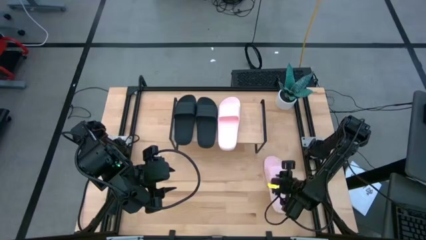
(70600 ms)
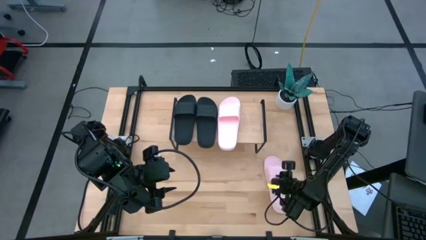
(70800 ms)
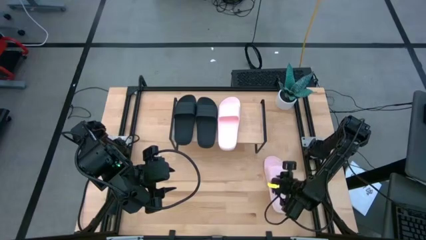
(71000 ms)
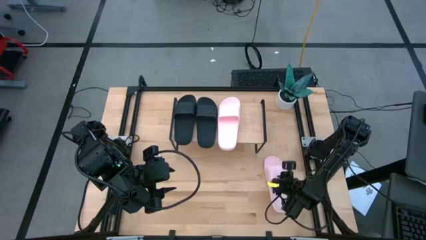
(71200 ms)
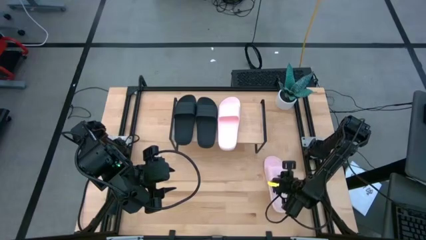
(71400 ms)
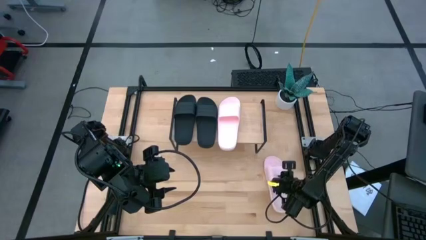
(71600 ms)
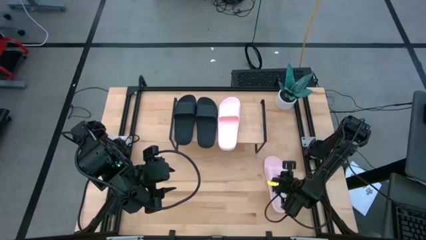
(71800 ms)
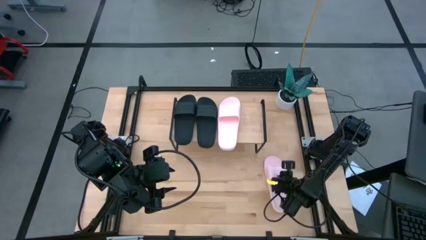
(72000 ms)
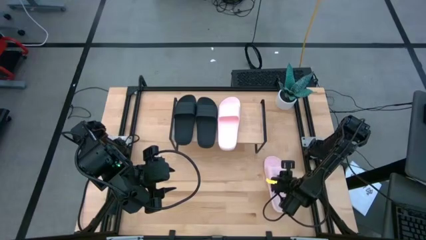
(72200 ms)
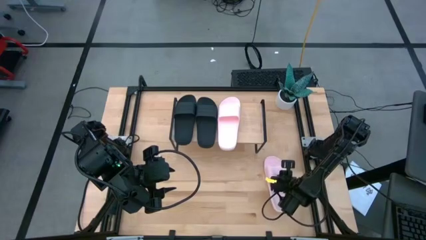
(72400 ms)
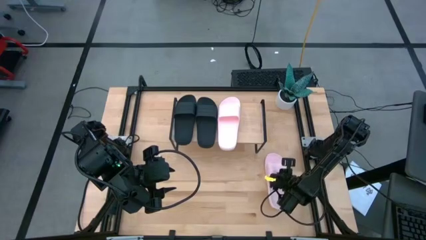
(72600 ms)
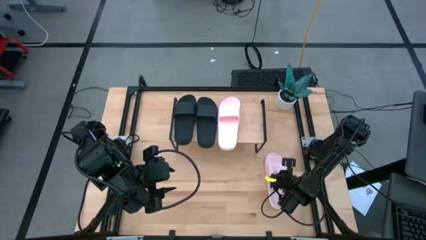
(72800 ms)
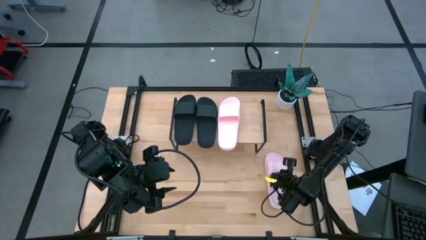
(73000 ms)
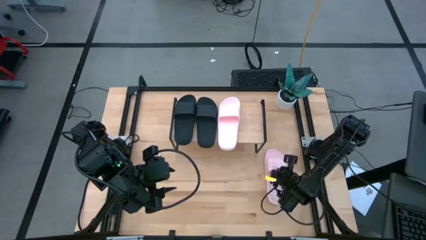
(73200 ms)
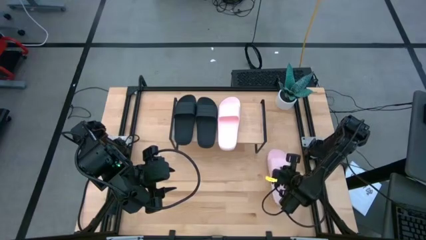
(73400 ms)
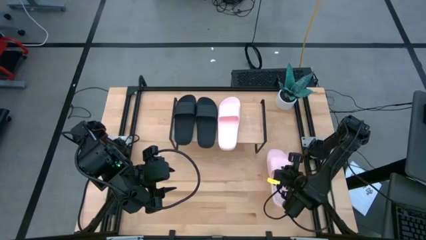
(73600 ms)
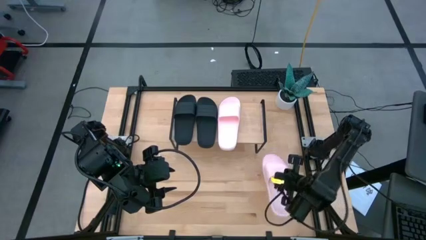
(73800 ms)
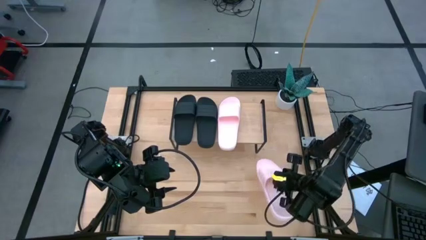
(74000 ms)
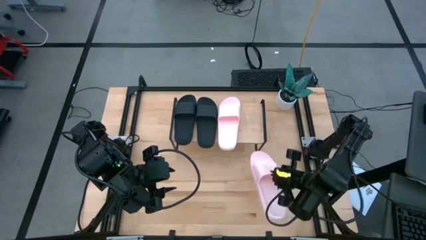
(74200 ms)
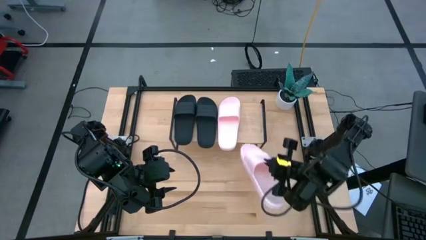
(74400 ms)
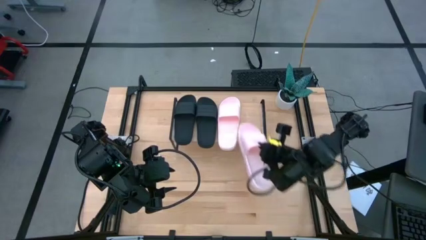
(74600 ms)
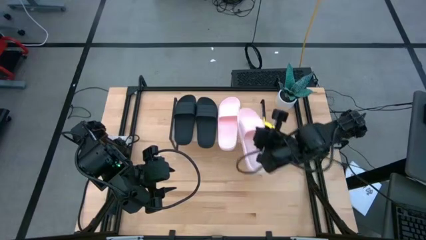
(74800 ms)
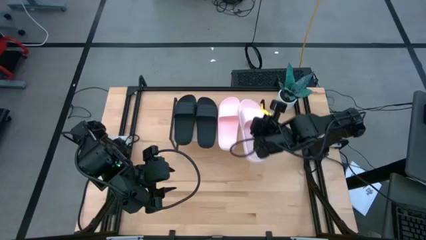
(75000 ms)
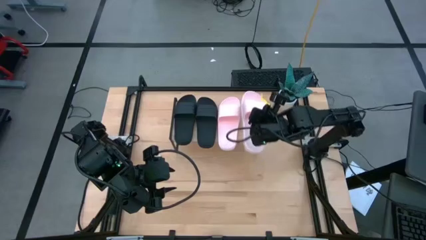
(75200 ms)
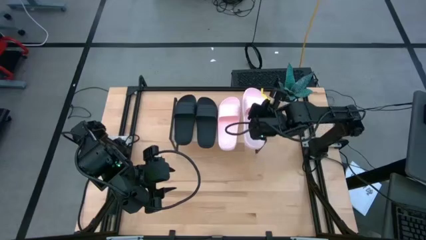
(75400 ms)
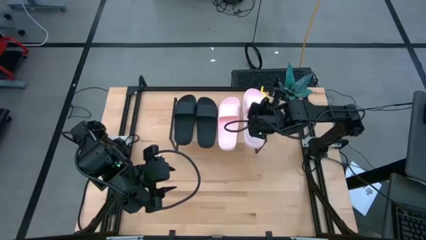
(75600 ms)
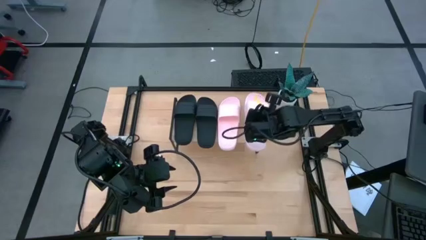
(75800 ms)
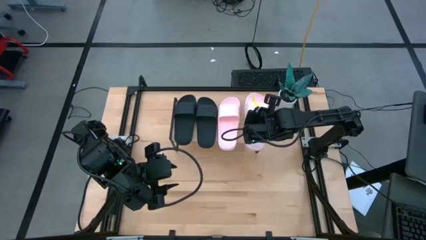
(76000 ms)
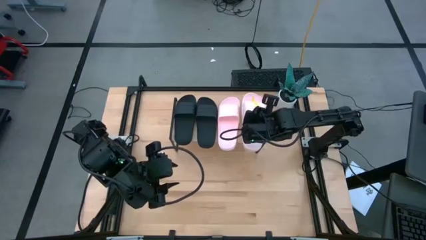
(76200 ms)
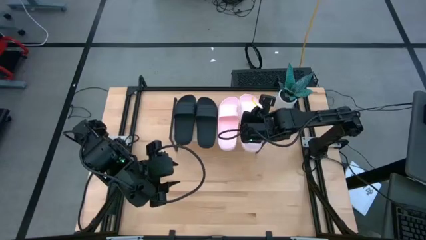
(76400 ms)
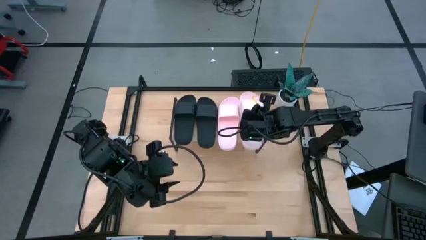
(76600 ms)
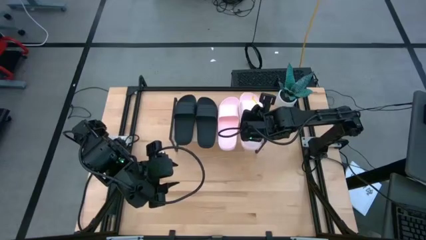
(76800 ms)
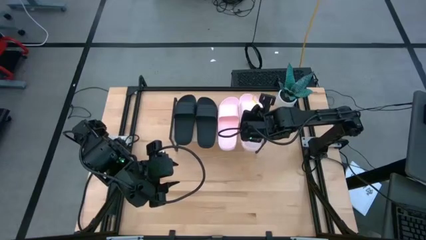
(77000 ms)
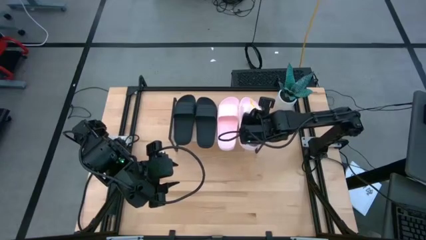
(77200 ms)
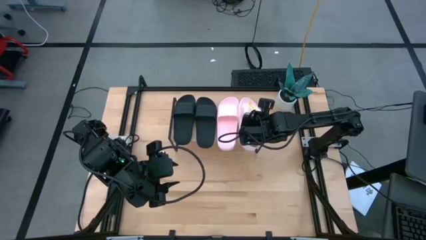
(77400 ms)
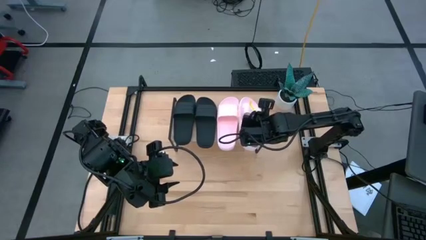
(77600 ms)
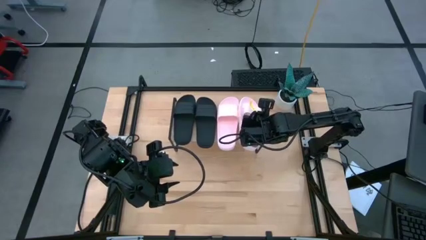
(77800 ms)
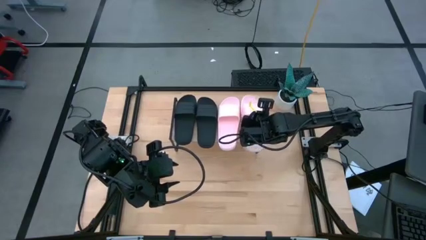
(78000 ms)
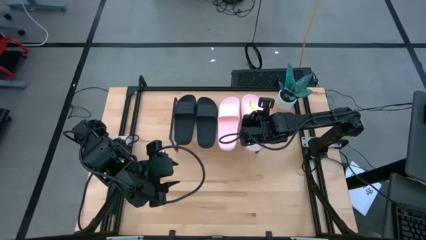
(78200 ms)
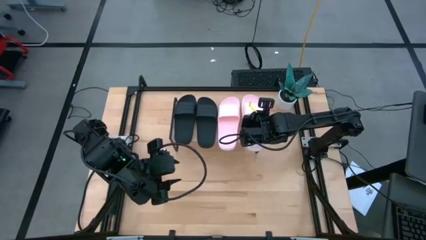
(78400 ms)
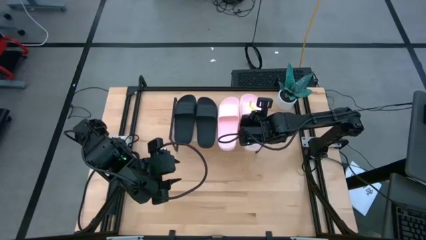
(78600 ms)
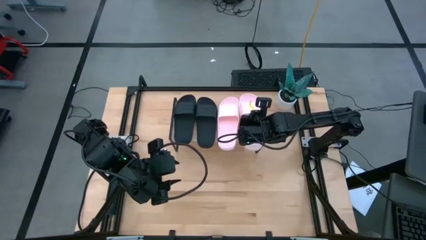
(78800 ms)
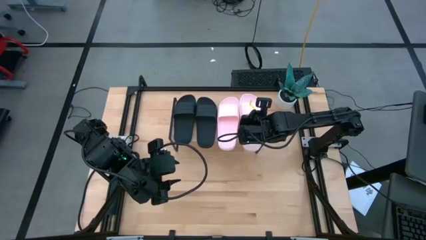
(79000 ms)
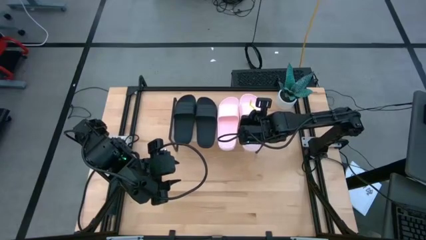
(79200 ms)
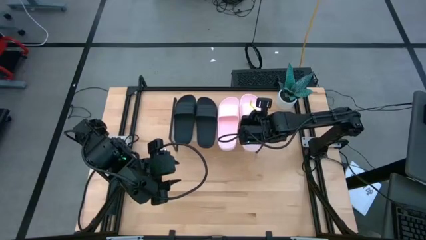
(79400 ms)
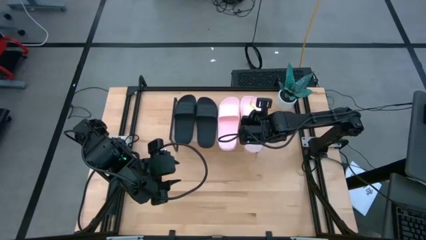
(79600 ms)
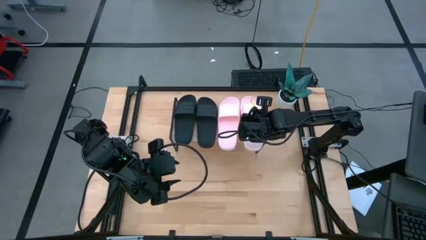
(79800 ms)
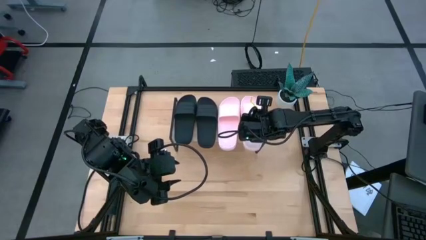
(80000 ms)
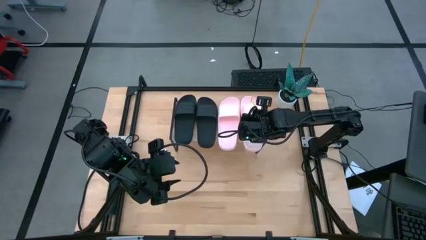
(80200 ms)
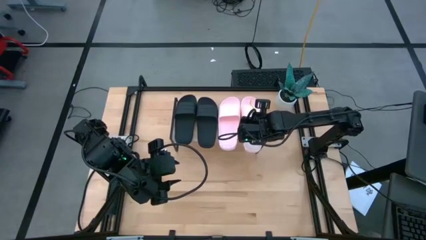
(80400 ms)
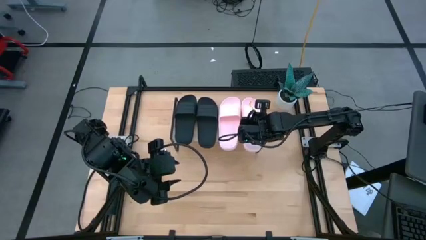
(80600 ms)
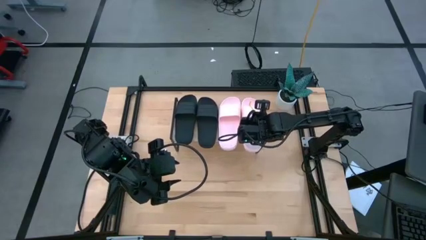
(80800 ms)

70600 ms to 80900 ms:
Task: Pick and place slides into the shelf
Put the pink slide next to the pink slide on the shelf

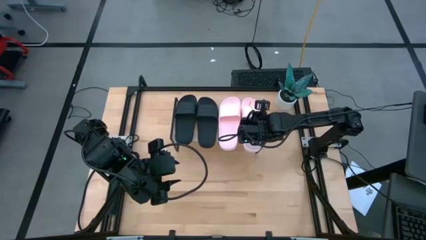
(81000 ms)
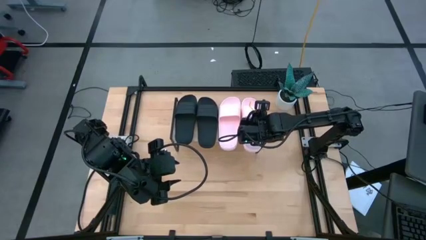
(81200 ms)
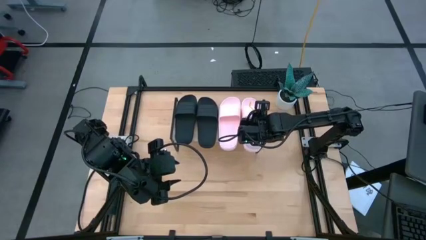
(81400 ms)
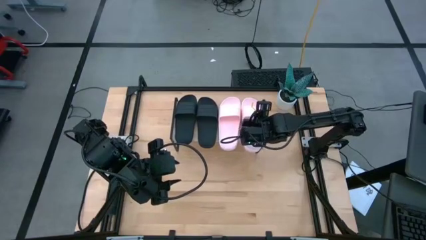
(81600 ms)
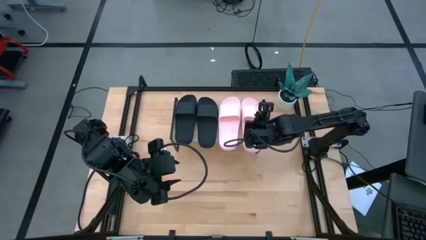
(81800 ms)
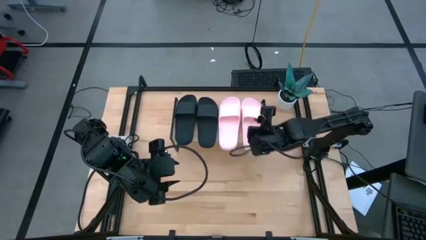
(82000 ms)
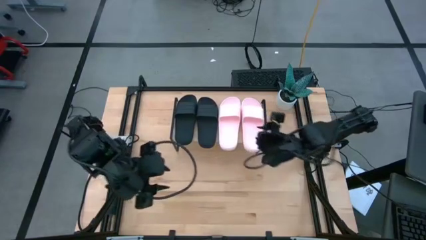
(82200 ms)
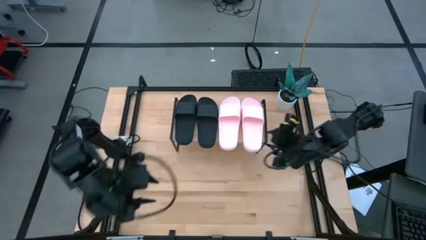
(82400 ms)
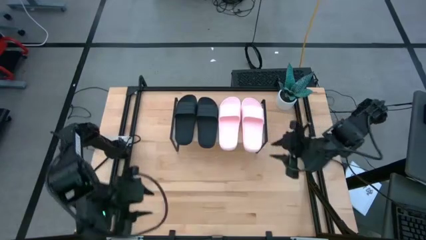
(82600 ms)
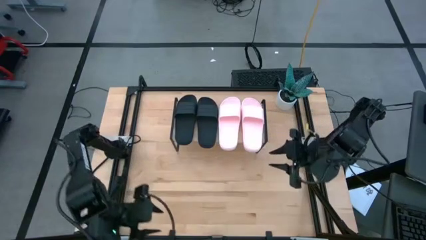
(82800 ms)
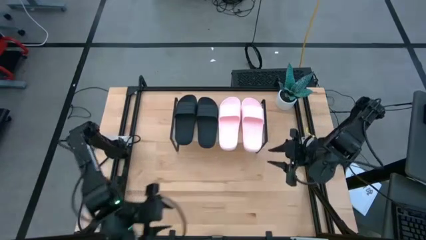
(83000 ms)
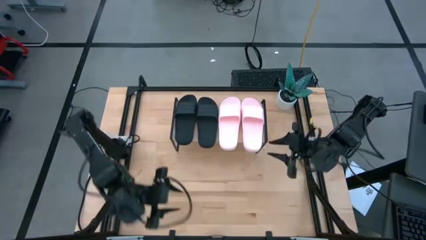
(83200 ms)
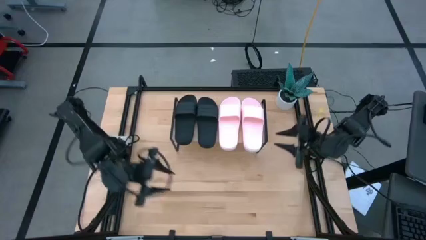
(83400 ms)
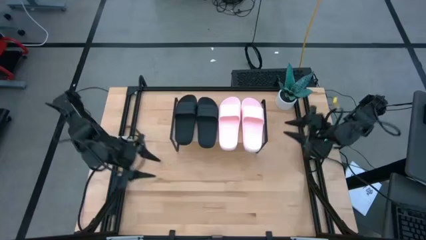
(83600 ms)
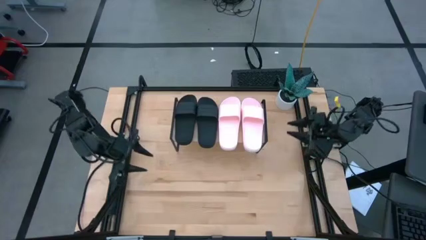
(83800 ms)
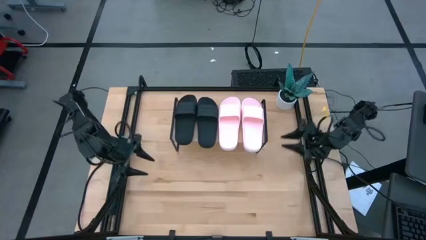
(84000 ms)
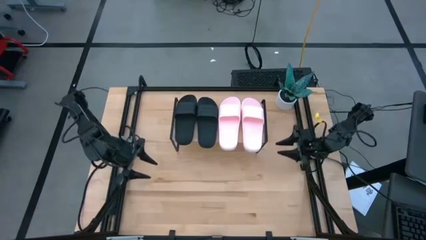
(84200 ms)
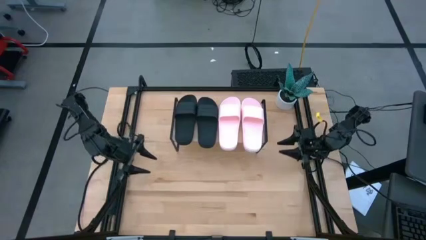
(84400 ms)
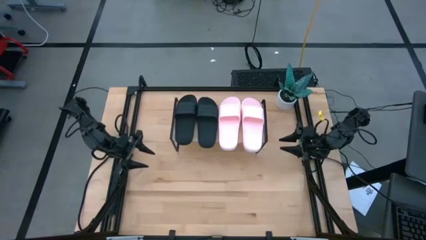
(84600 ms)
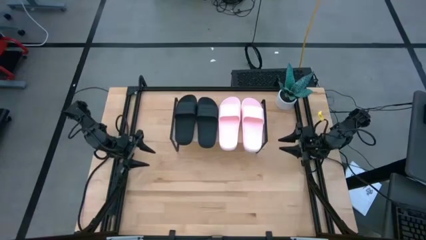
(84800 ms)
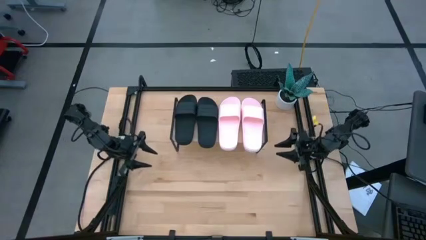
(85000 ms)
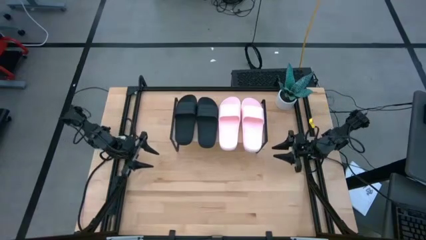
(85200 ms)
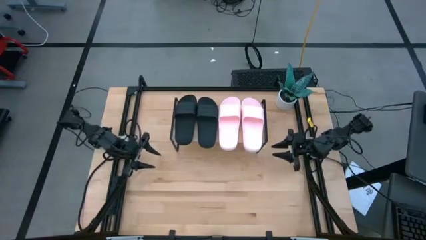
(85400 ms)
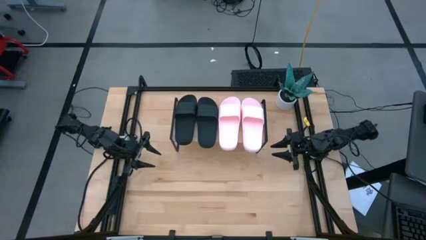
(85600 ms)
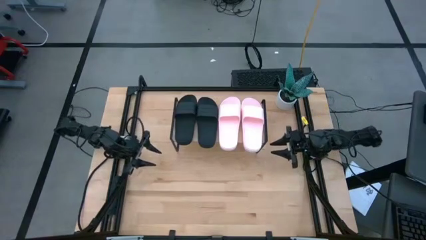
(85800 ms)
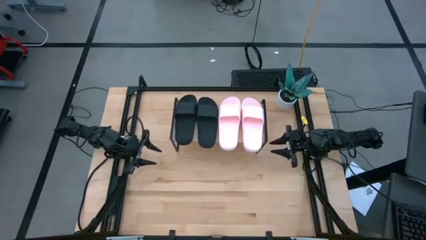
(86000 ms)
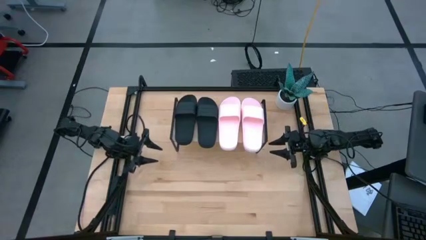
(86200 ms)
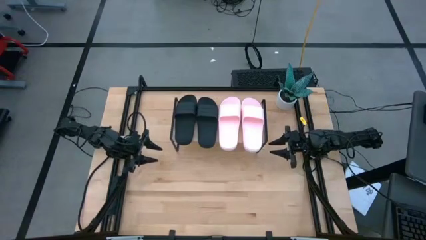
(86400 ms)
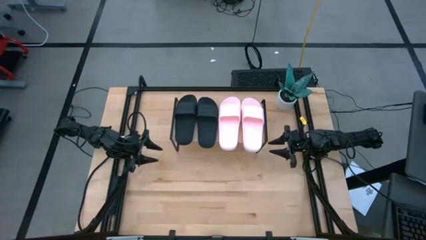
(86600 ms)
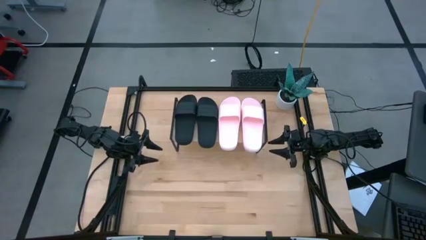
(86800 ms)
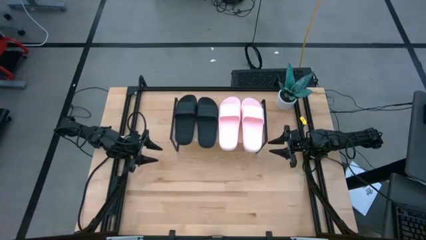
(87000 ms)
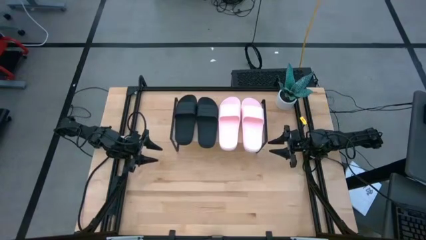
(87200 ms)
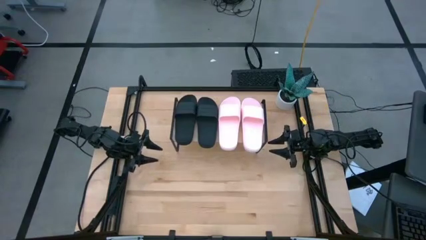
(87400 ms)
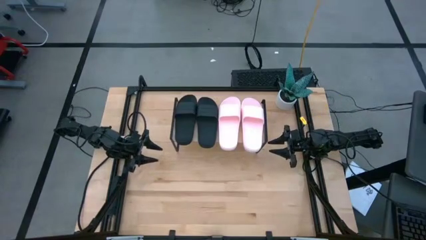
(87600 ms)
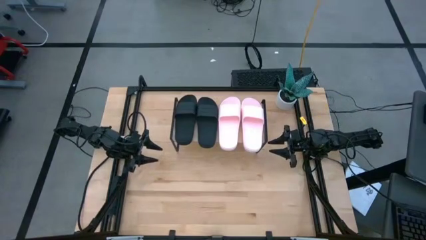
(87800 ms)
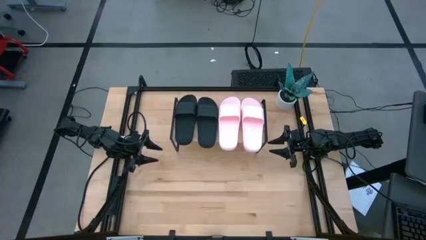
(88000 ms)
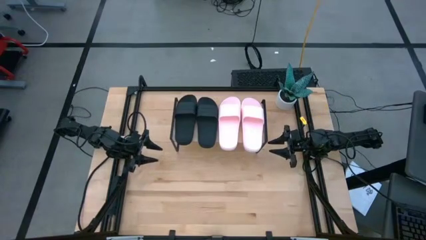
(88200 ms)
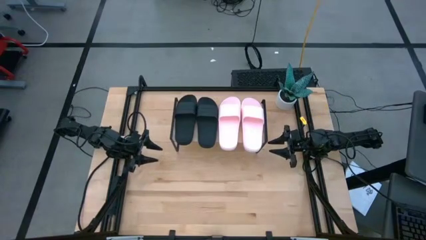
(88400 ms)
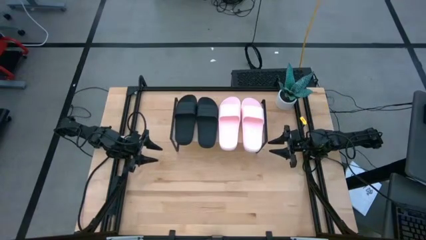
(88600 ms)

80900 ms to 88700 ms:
Return to Home Position
